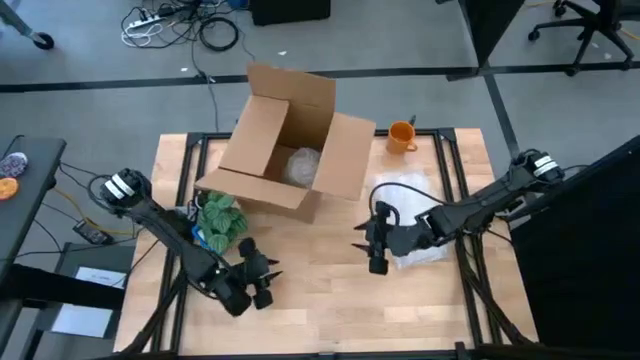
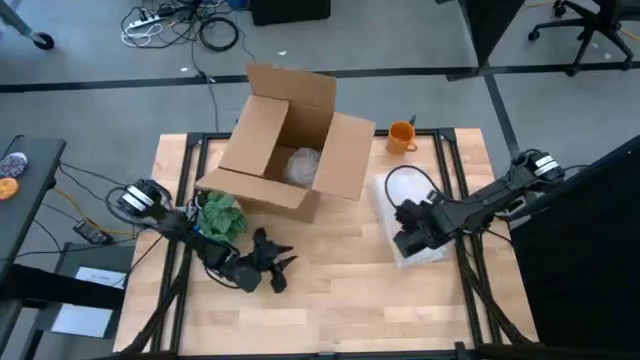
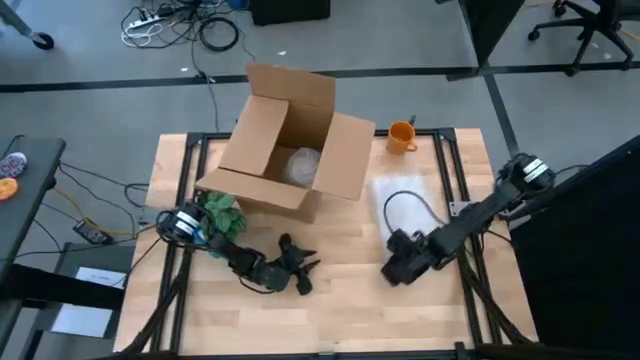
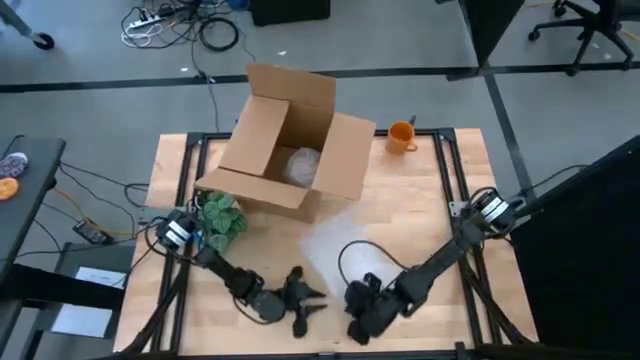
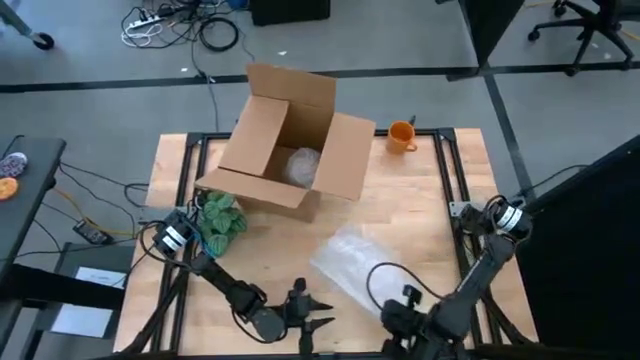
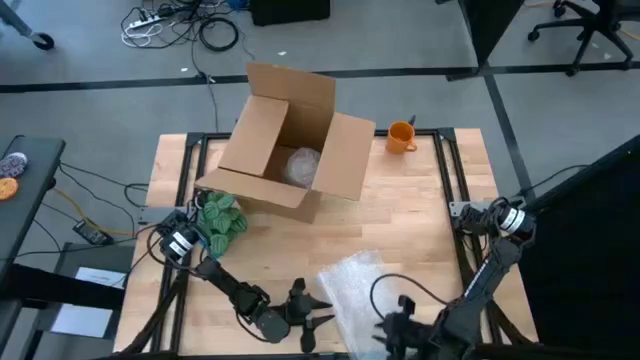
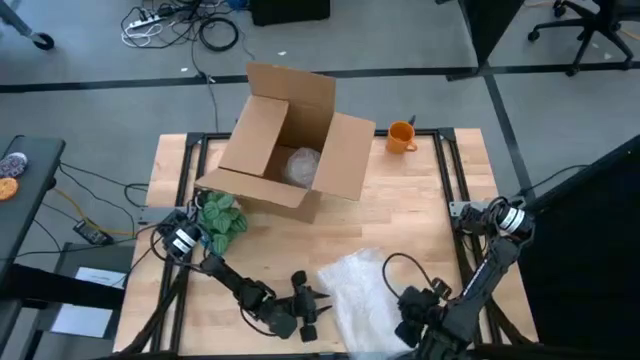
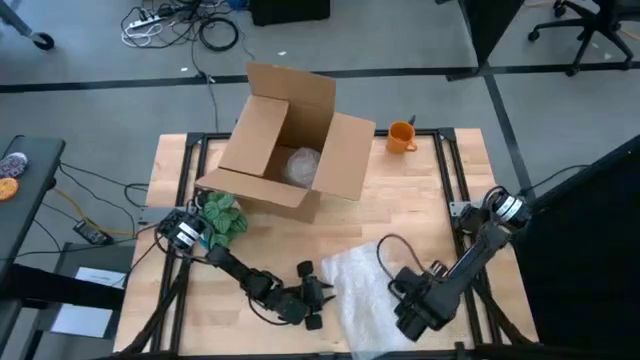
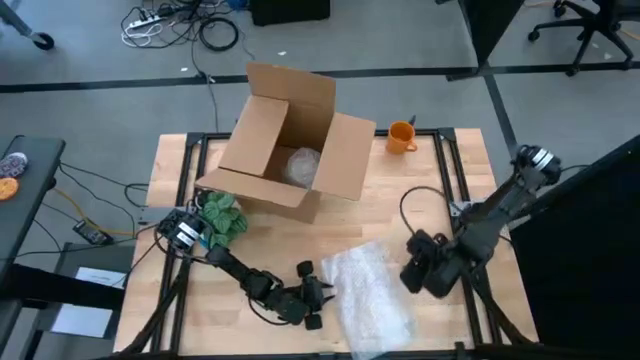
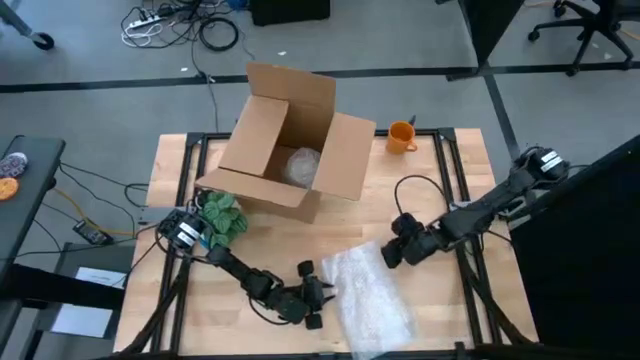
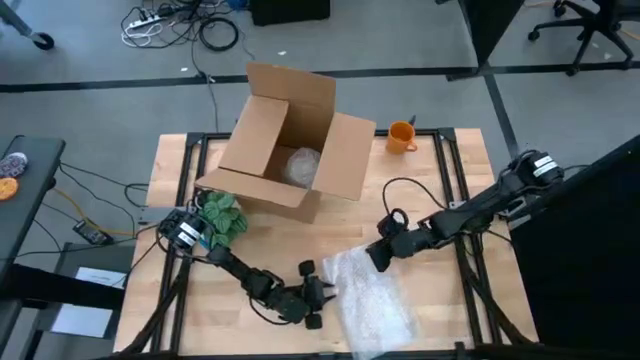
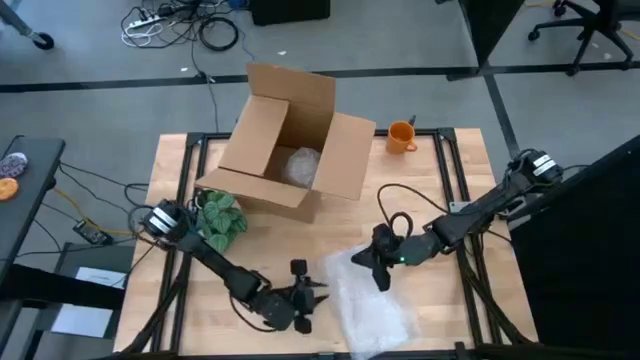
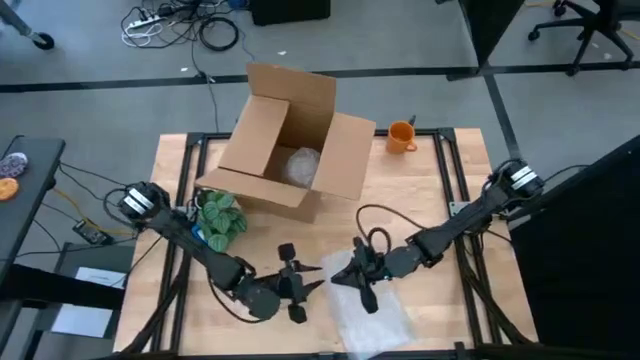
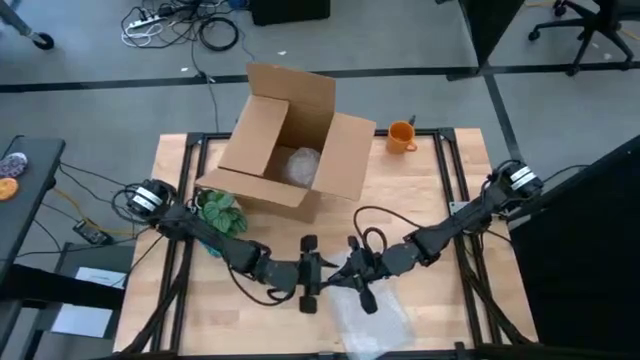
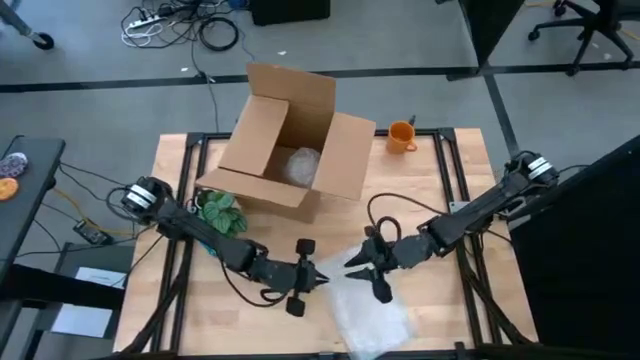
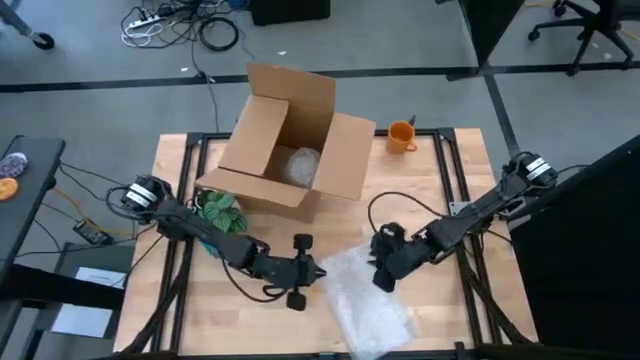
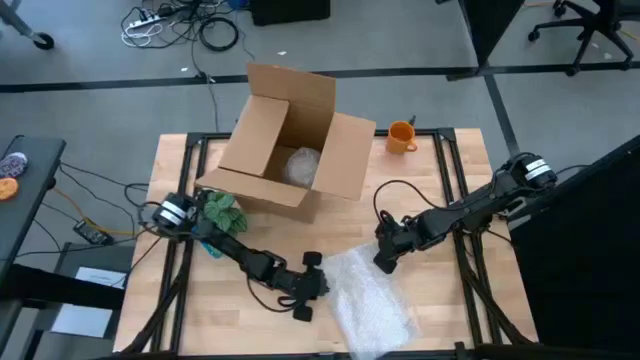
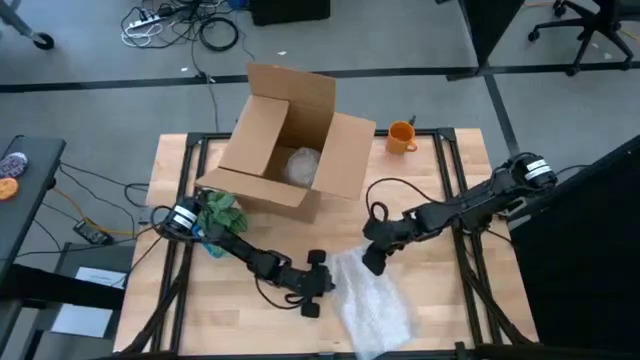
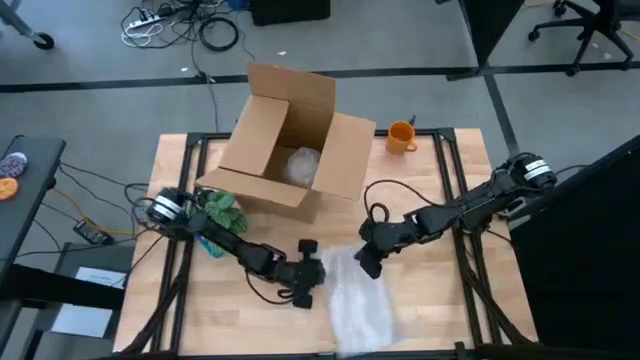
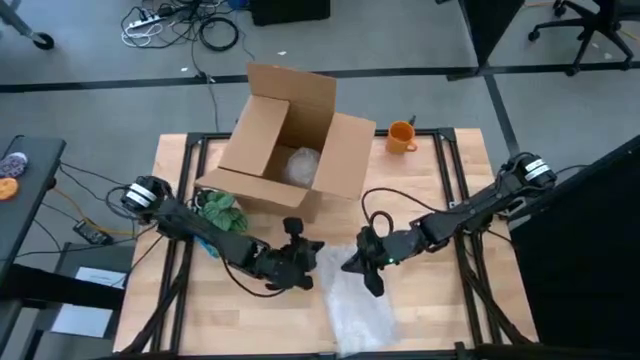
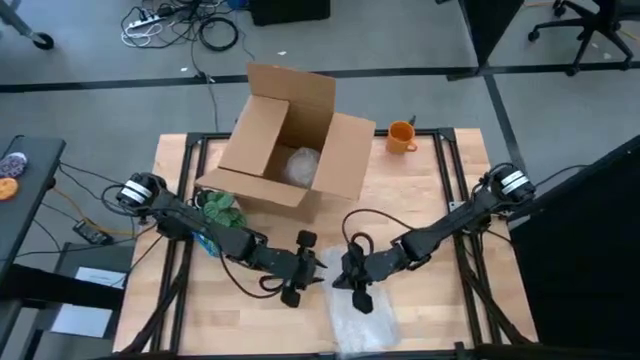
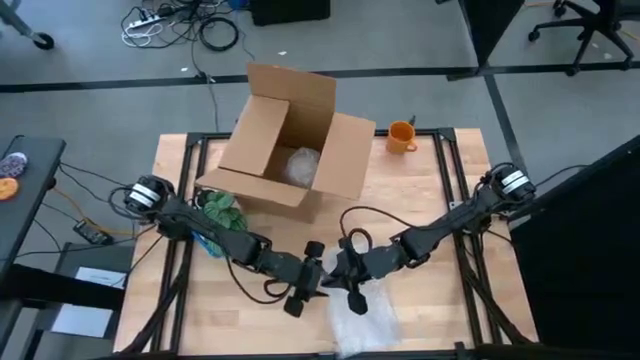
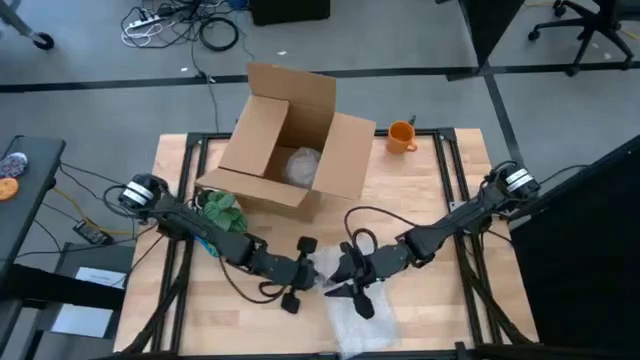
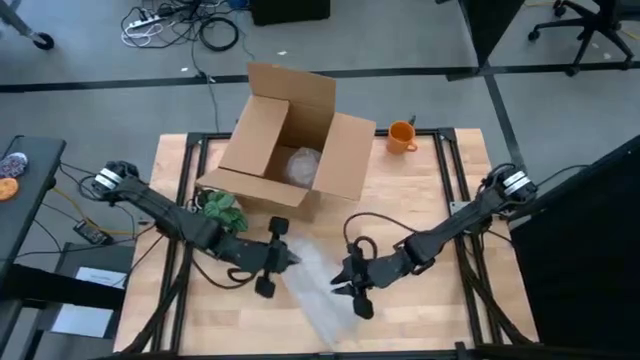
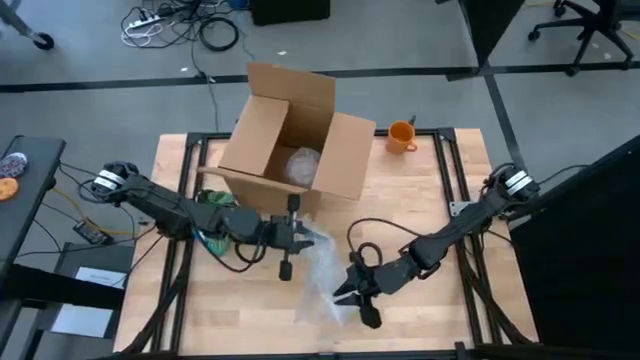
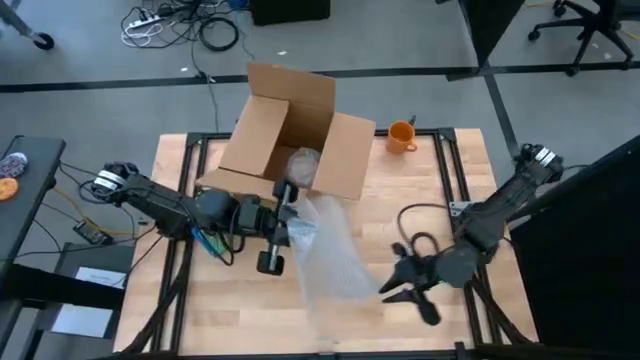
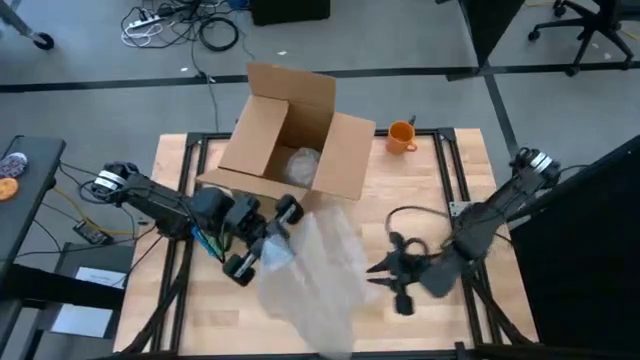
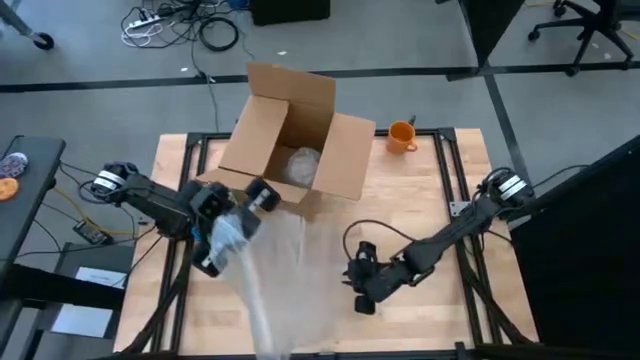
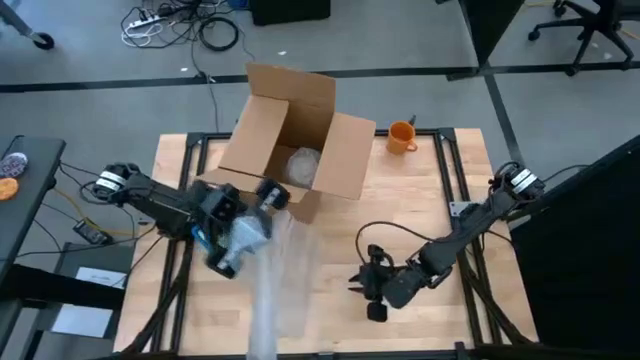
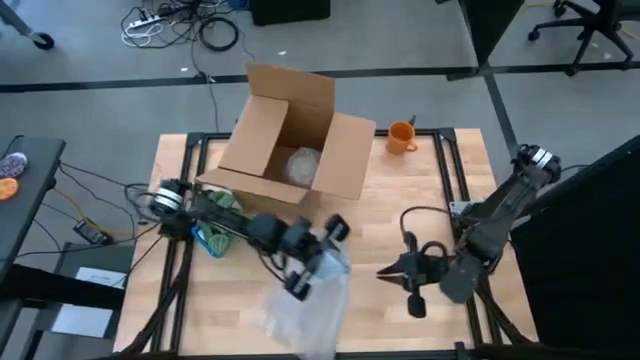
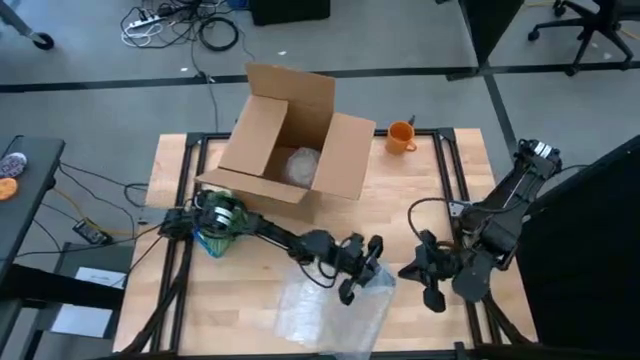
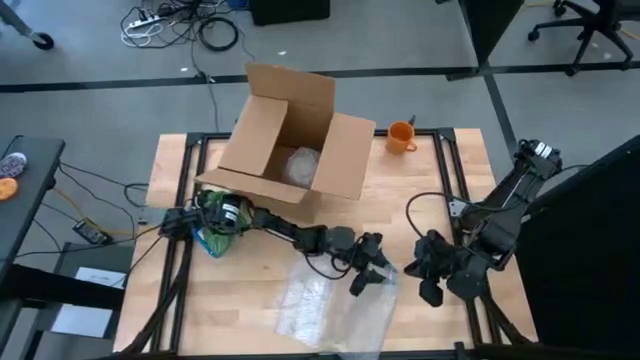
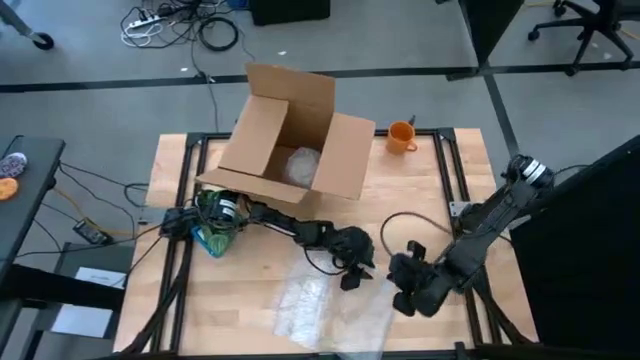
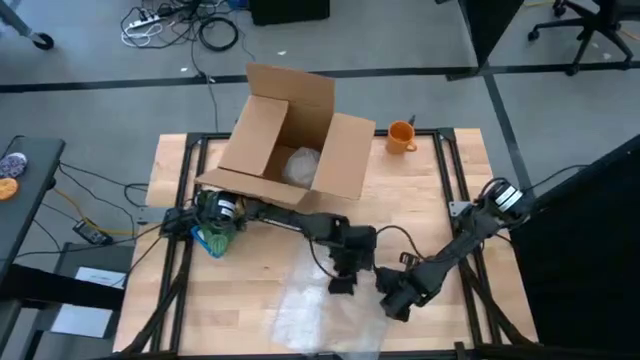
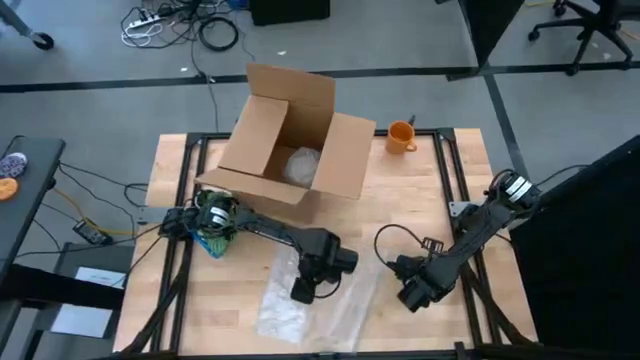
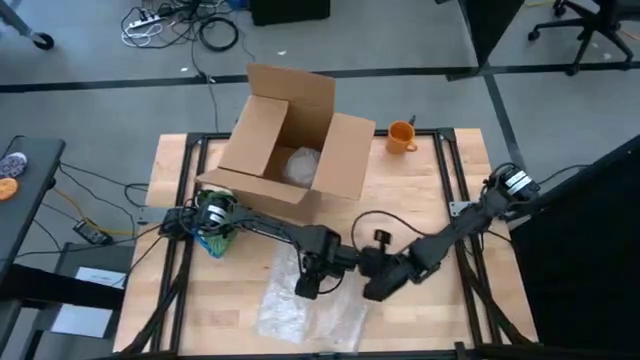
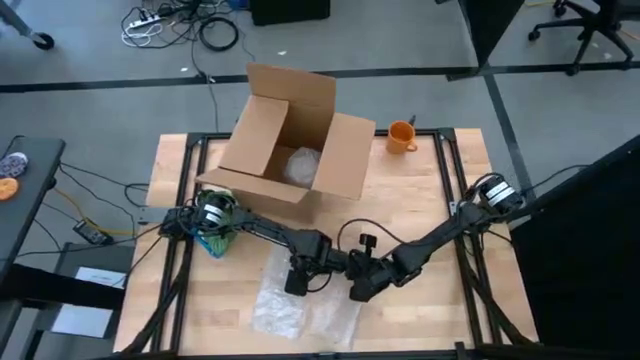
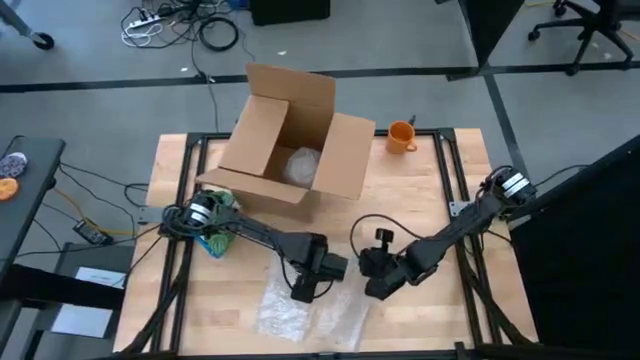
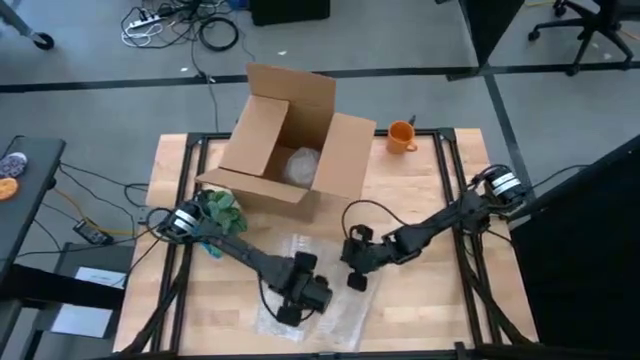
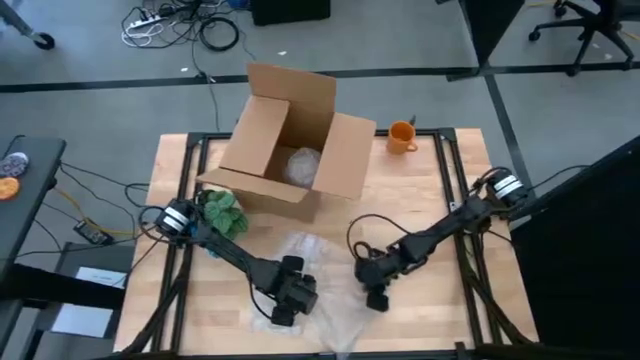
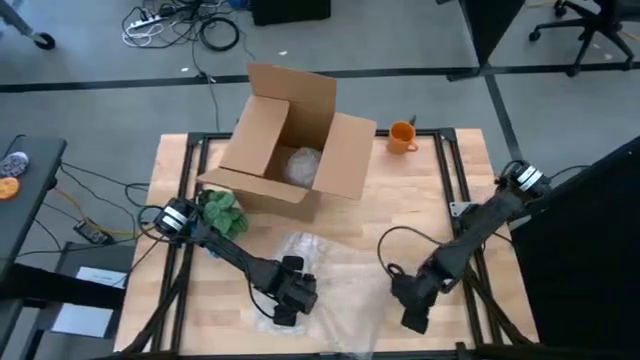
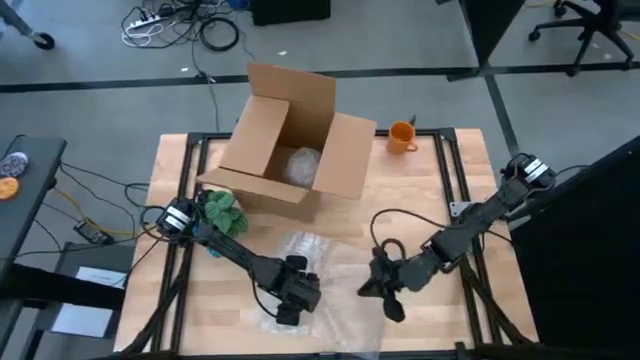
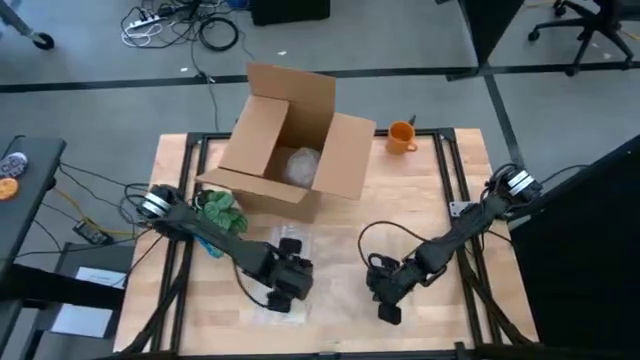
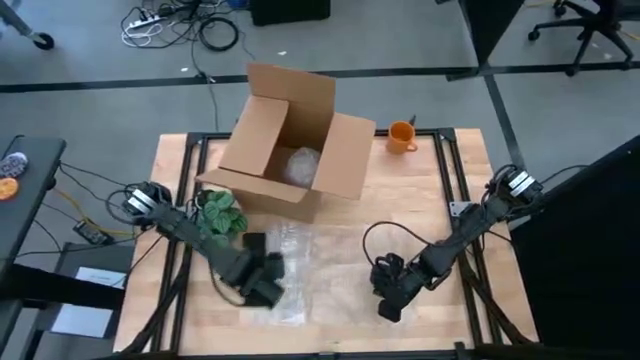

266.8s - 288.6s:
Task: wrap mug
Wrap the orange mug with the bubble wrap
